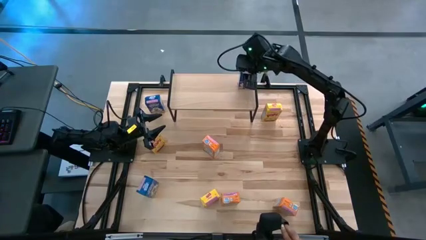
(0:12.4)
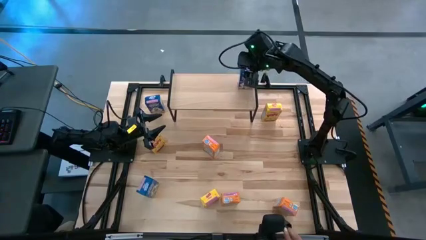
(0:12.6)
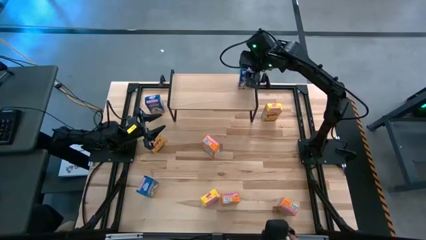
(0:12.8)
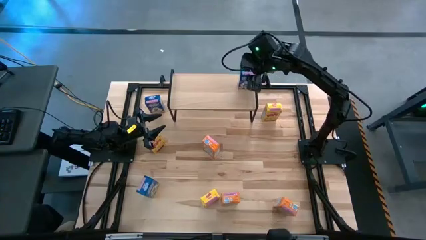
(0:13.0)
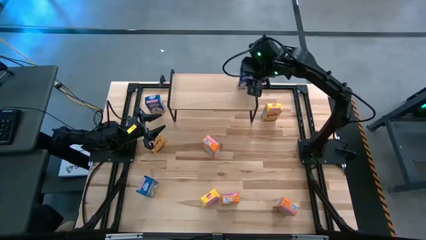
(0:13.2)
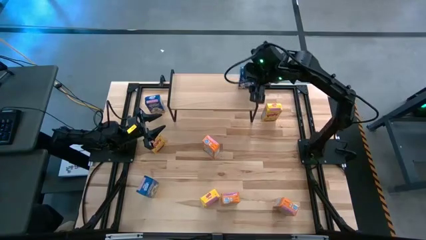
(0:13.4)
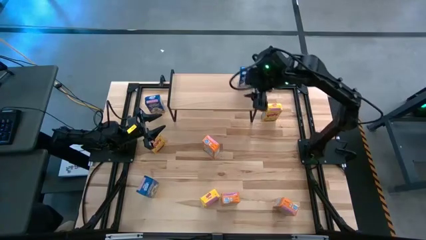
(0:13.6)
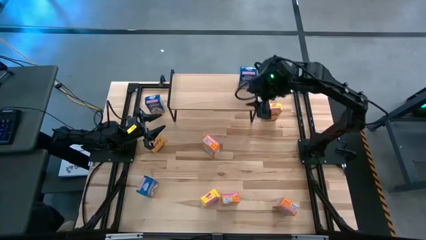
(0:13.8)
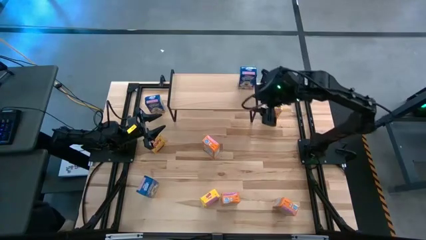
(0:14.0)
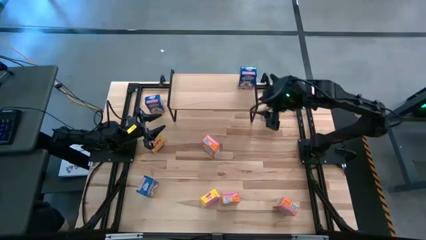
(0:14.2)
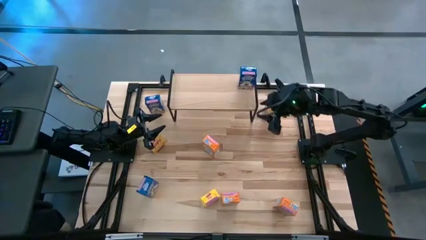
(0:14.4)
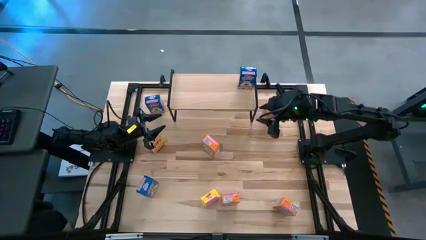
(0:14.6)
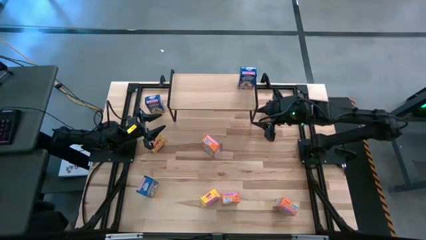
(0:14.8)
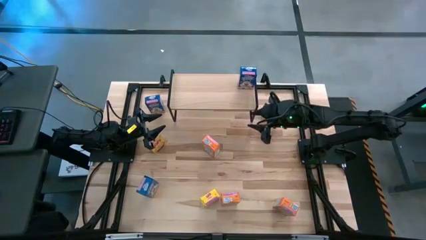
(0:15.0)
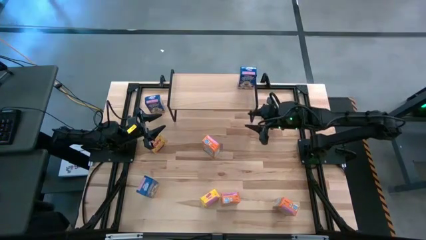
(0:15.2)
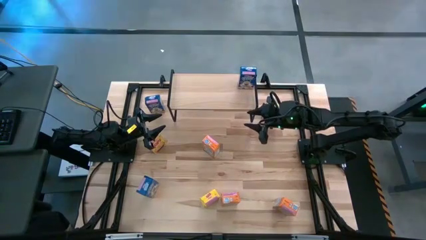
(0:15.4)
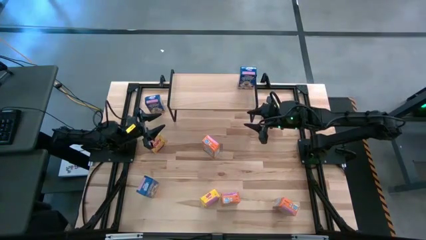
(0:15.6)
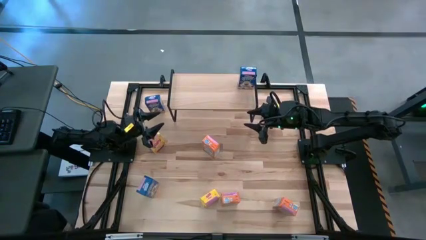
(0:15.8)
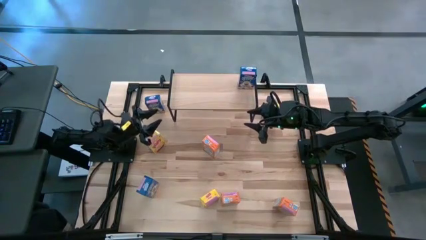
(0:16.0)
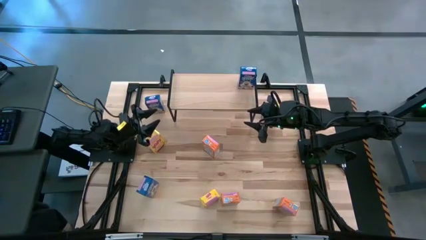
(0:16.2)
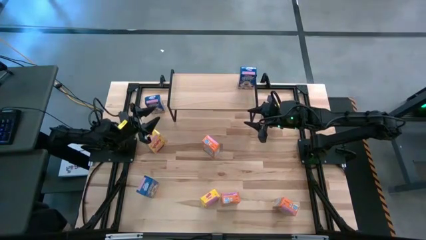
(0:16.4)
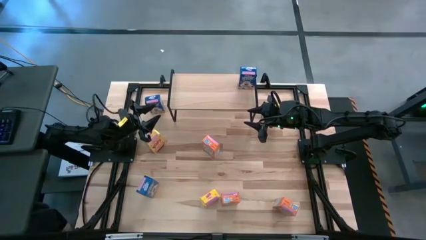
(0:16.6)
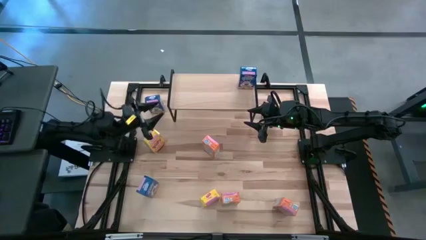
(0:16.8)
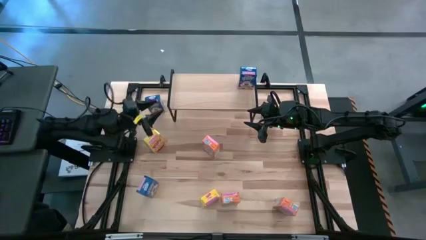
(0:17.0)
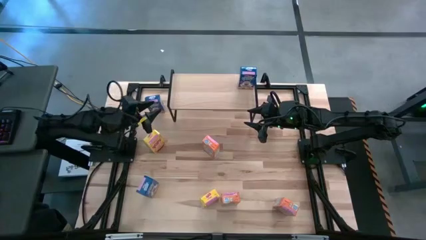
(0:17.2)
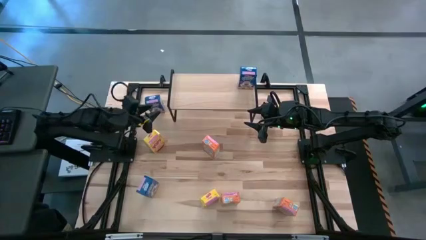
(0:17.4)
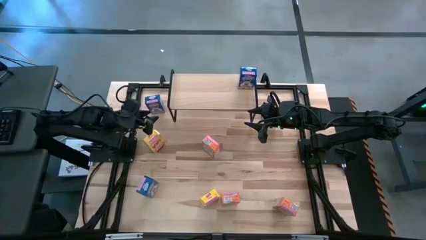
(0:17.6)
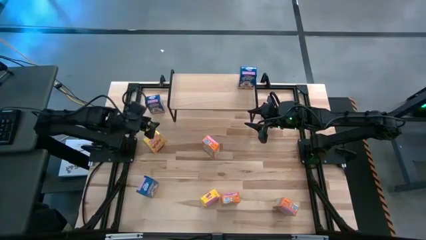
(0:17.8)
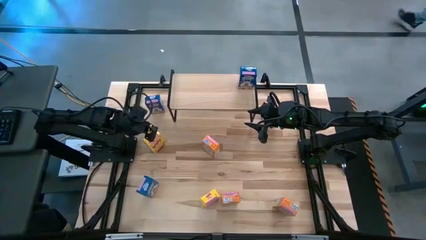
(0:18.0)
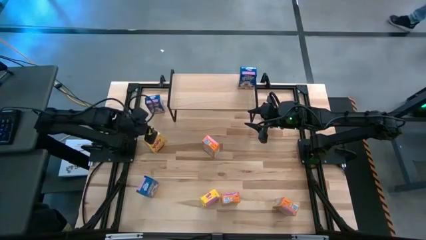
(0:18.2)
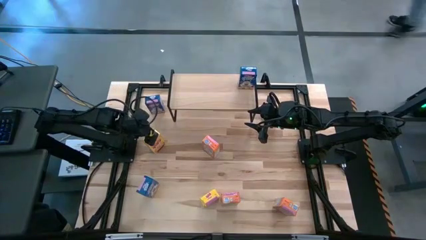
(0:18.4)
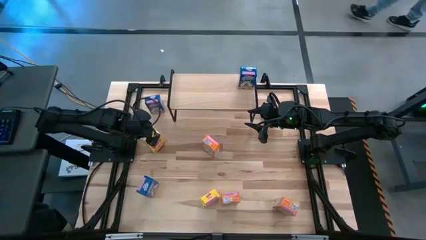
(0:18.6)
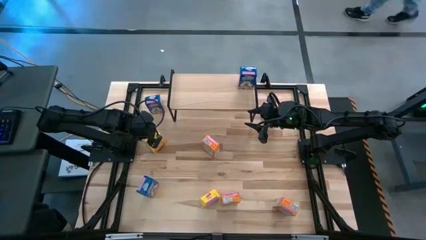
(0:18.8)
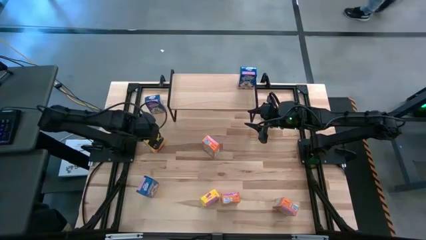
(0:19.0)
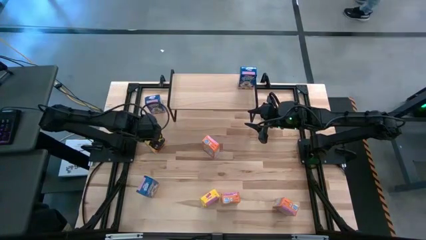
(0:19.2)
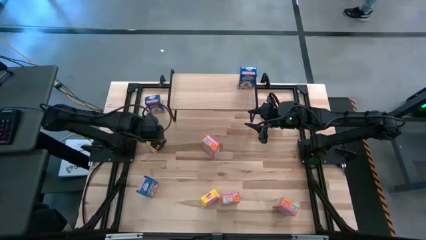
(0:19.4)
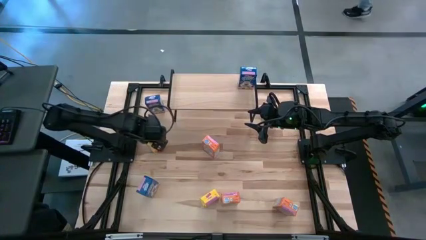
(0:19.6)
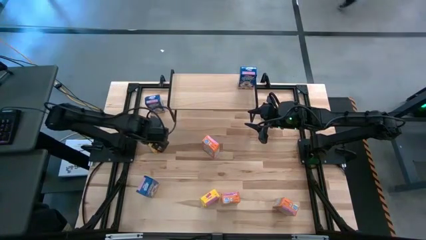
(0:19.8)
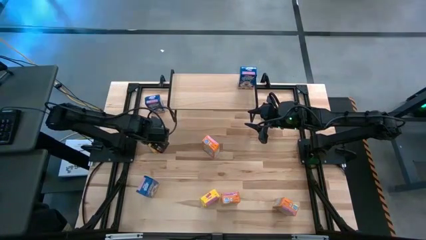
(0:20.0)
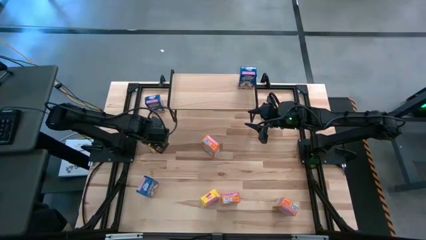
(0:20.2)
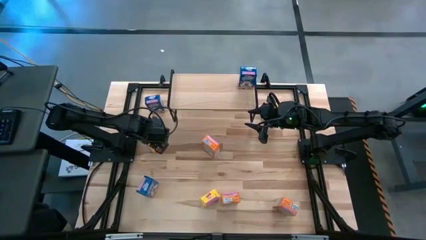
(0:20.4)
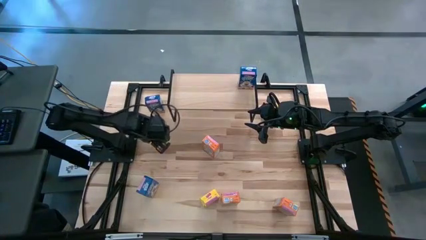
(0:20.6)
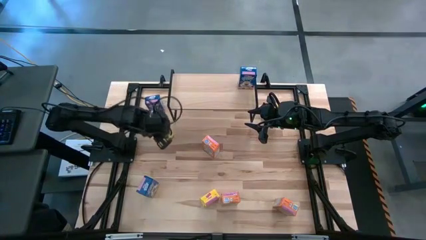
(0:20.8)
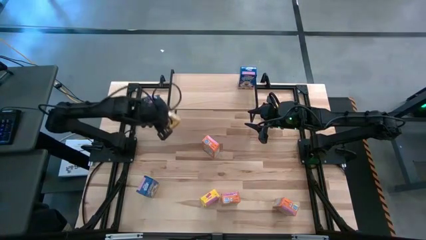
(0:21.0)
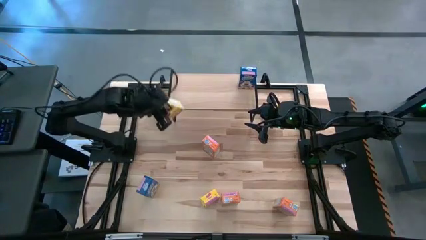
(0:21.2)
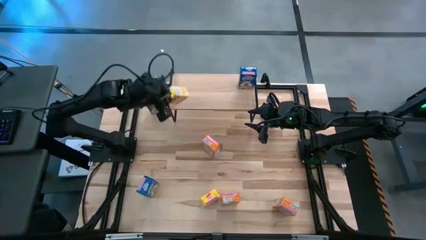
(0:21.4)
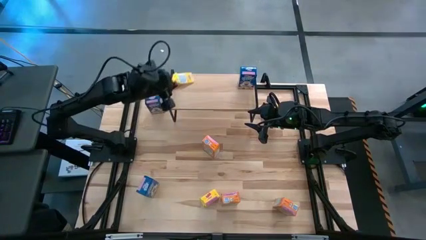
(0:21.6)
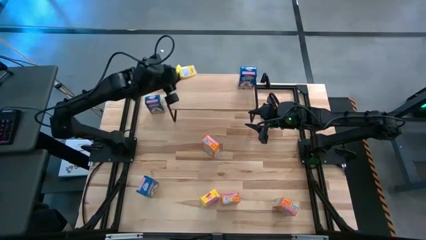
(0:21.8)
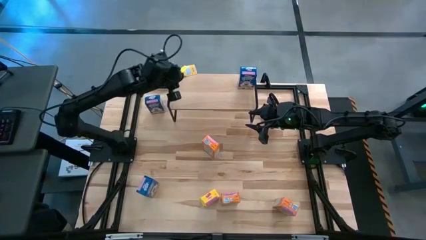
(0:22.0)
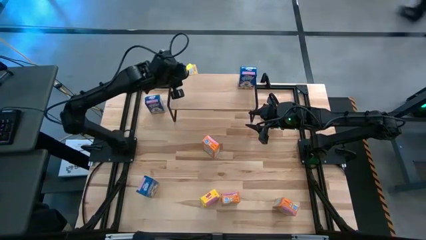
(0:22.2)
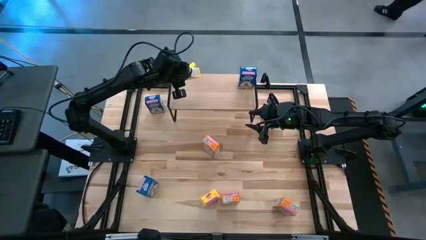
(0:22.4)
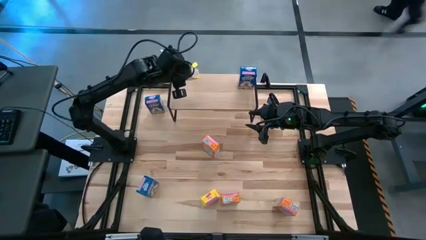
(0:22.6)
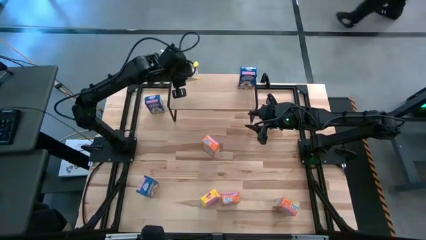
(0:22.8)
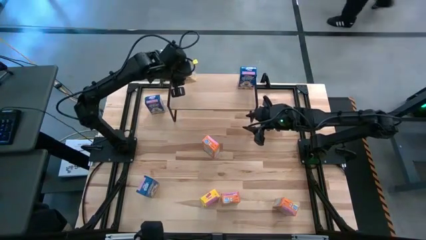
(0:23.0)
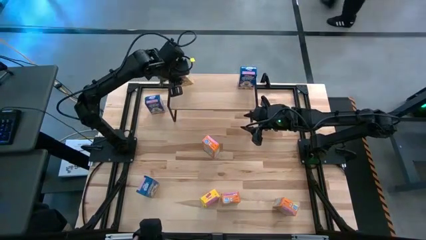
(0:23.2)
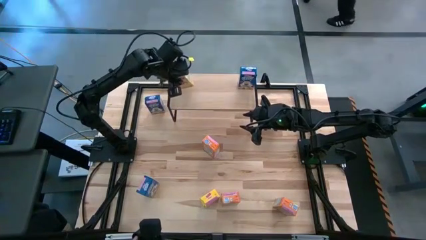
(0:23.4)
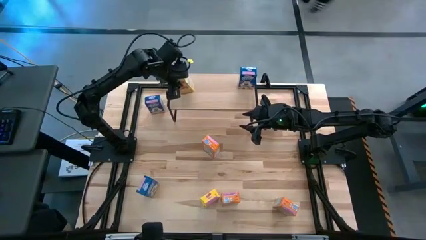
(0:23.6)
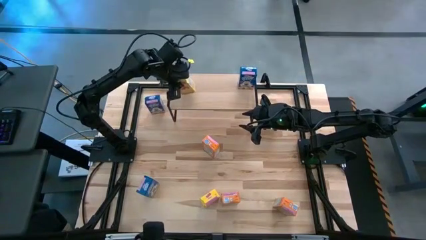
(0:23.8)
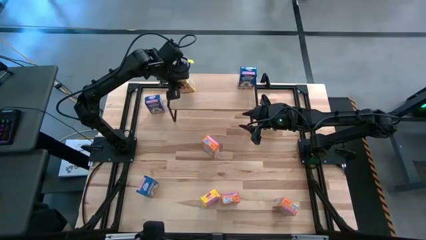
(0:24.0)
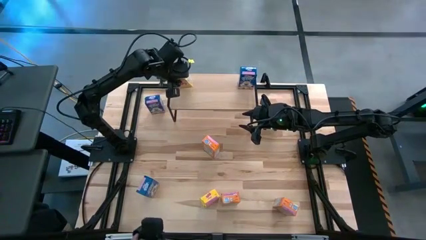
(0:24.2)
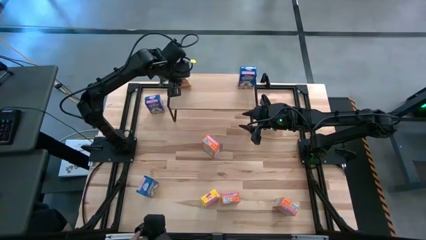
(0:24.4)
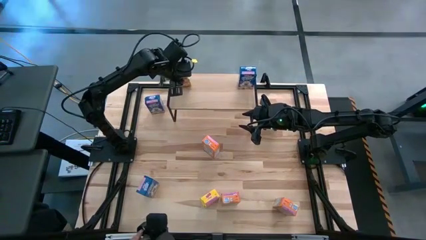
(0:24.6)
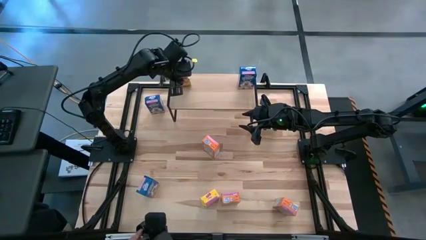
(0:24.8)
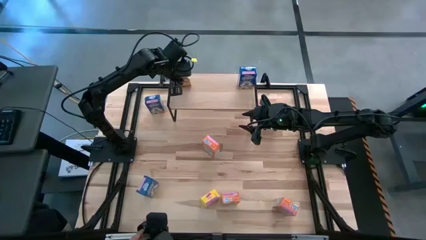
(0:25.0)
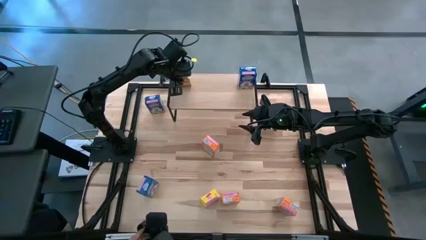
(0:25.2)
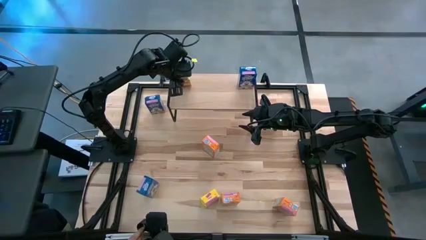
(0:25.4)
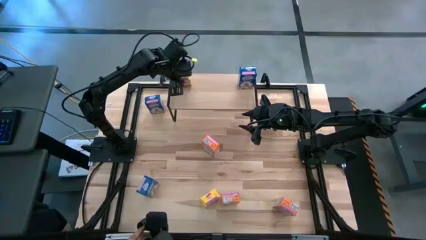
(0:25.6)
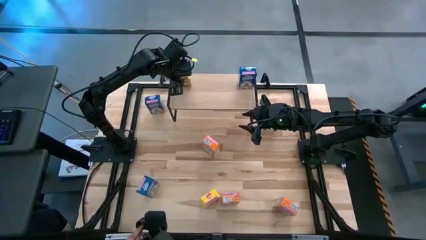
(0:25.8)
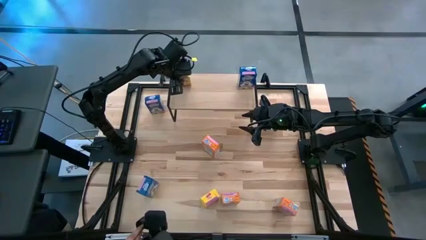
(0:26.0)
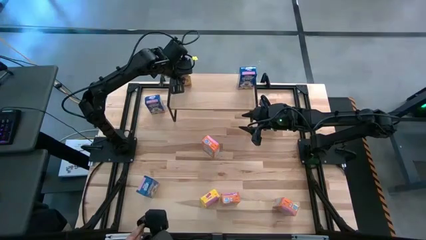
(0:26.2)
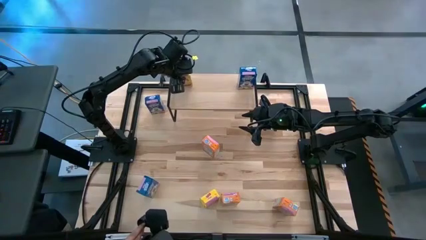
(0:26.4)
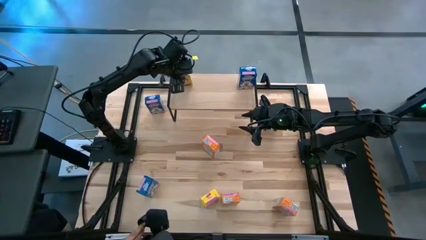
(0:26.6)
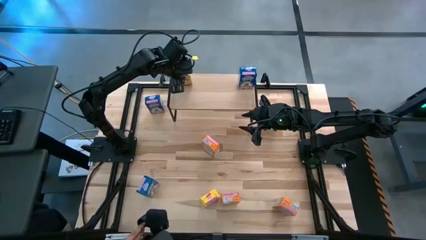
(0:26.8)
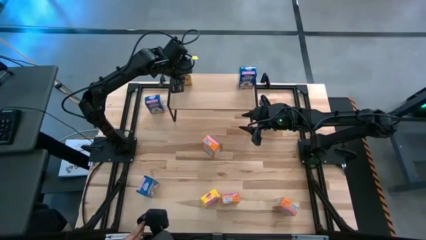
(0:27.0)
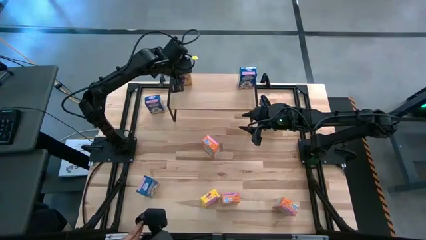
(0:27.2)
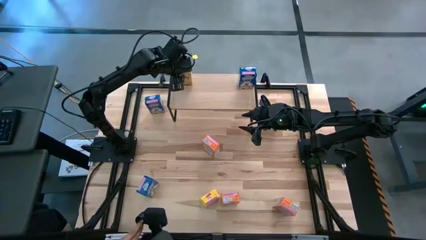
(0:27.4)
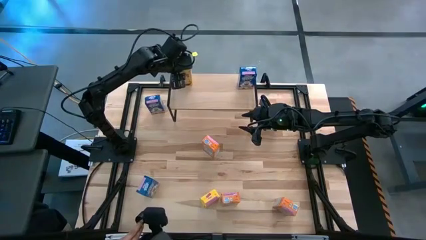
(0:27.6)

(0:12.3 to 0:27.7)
Task: Stack cereal on shelf
Put the middle left yellow cereal box on the shelf
